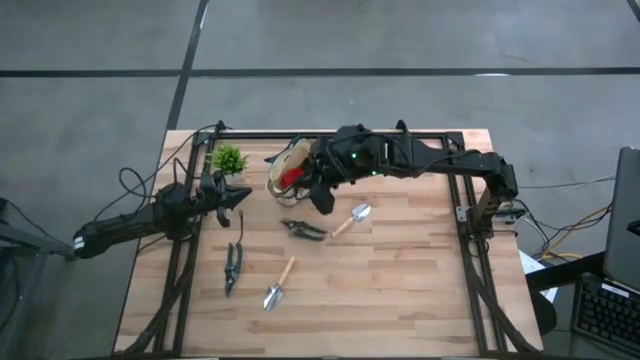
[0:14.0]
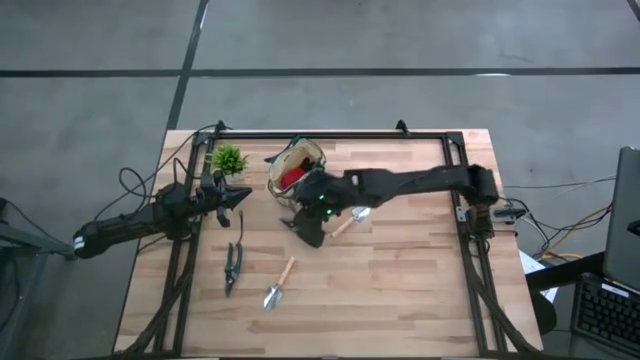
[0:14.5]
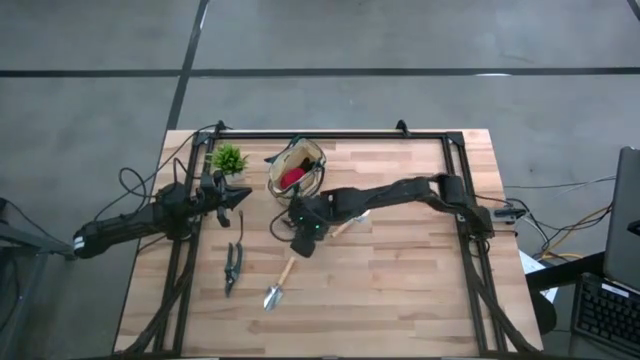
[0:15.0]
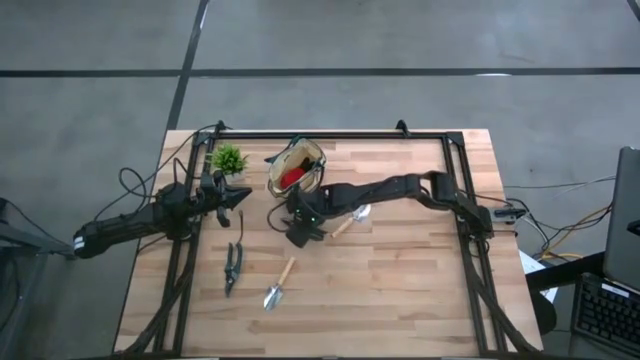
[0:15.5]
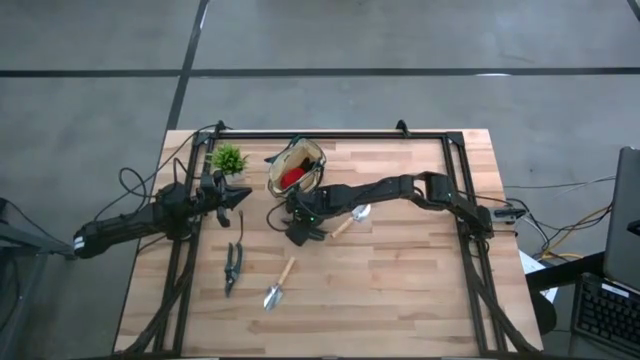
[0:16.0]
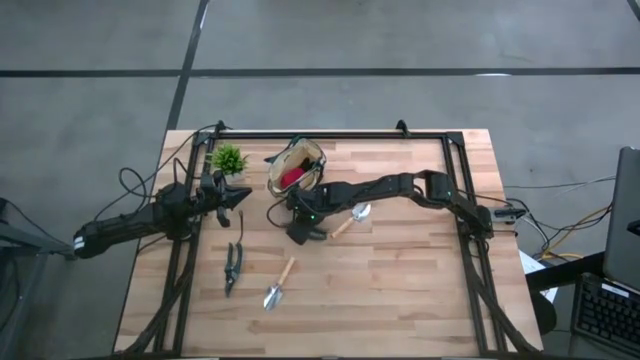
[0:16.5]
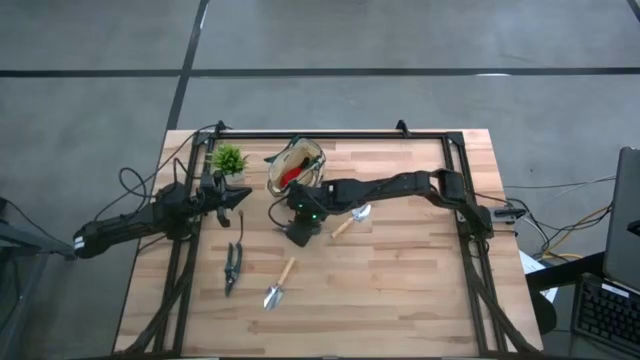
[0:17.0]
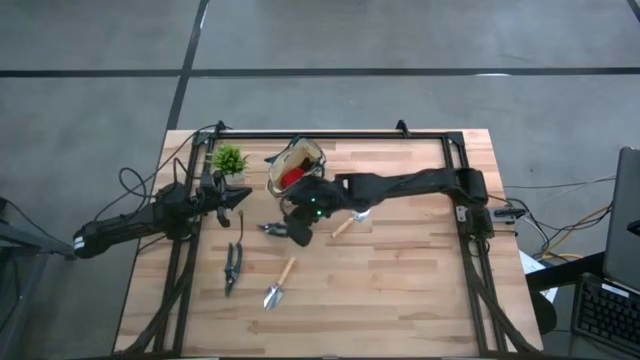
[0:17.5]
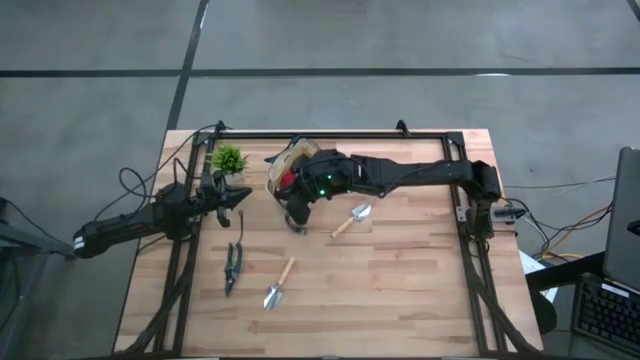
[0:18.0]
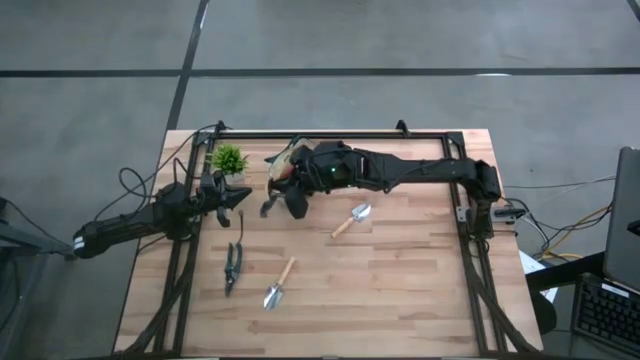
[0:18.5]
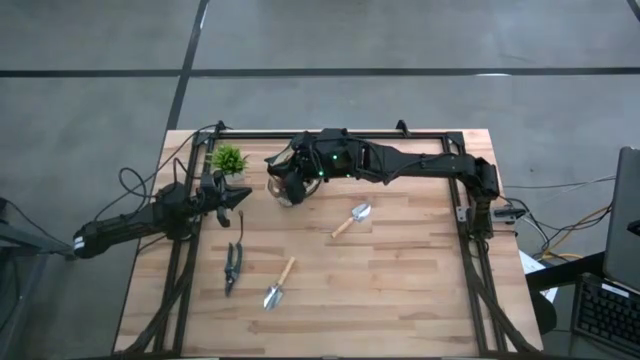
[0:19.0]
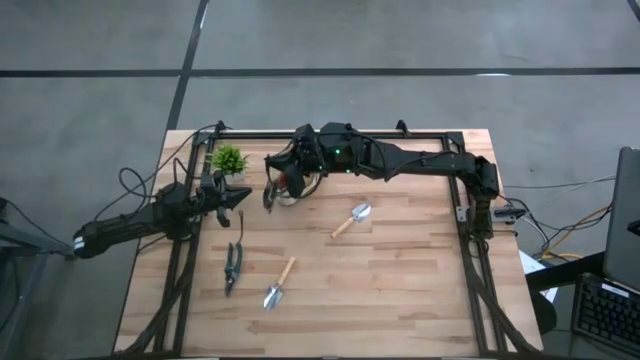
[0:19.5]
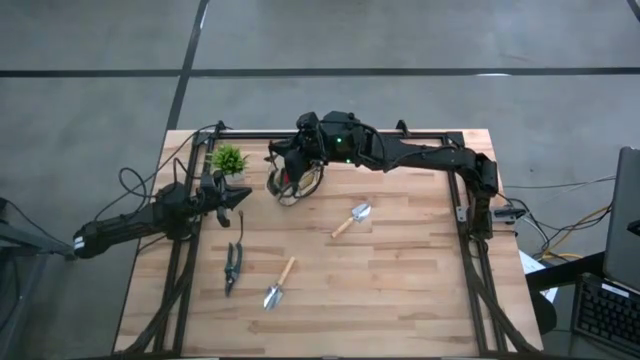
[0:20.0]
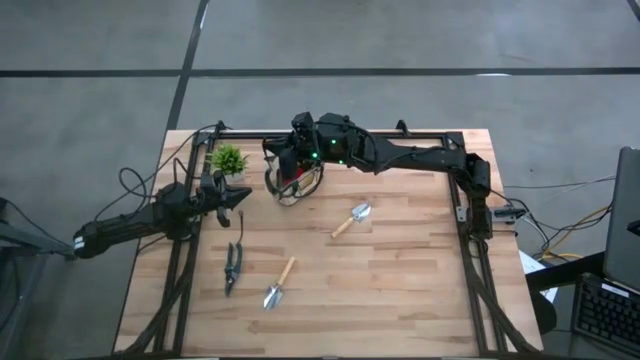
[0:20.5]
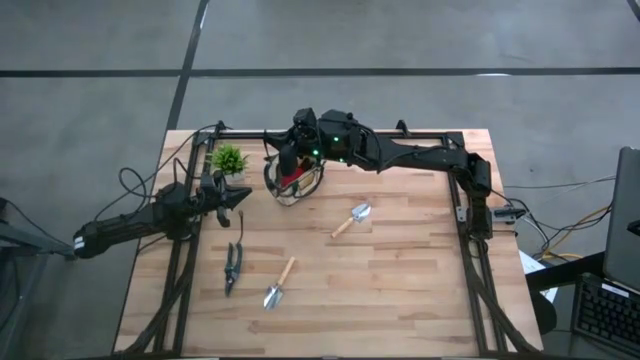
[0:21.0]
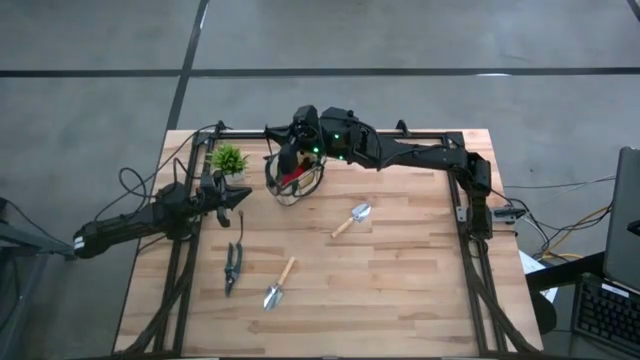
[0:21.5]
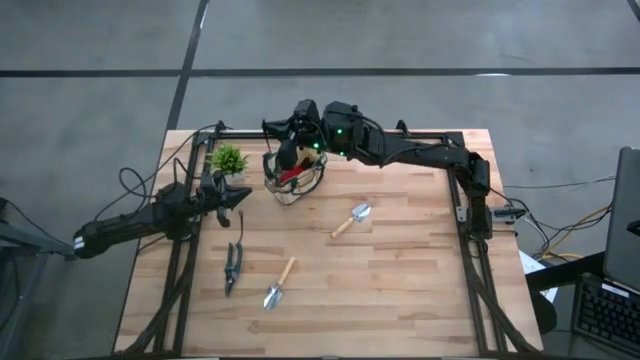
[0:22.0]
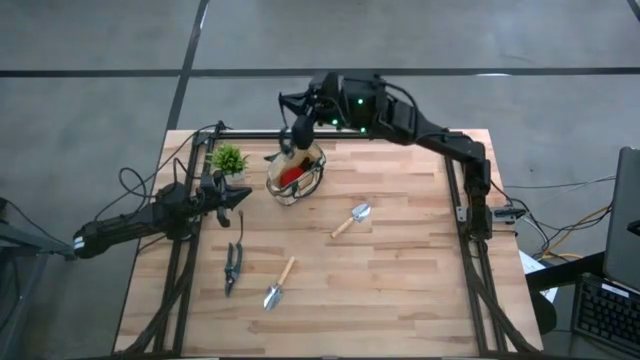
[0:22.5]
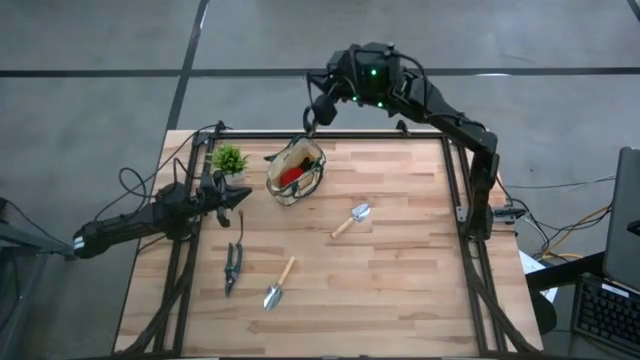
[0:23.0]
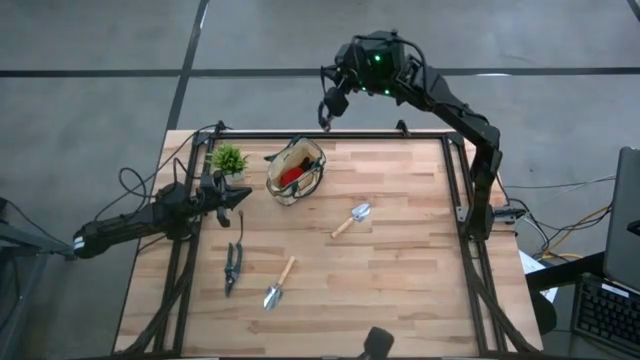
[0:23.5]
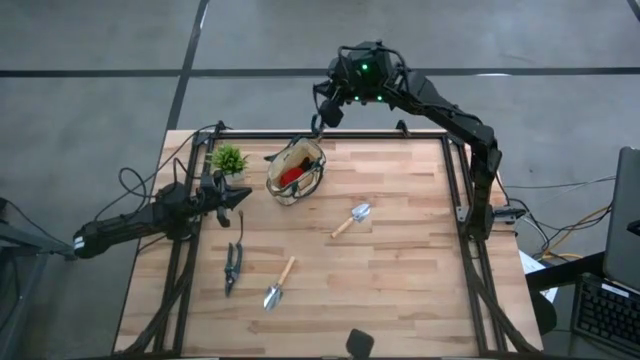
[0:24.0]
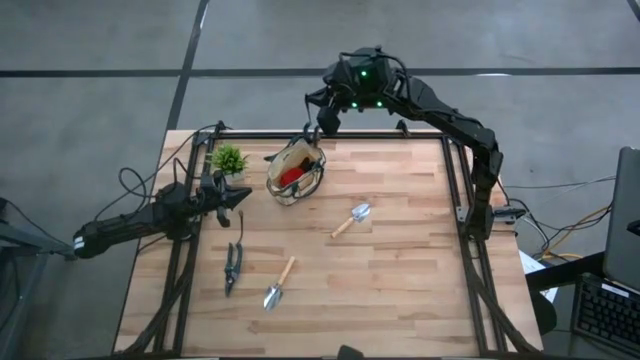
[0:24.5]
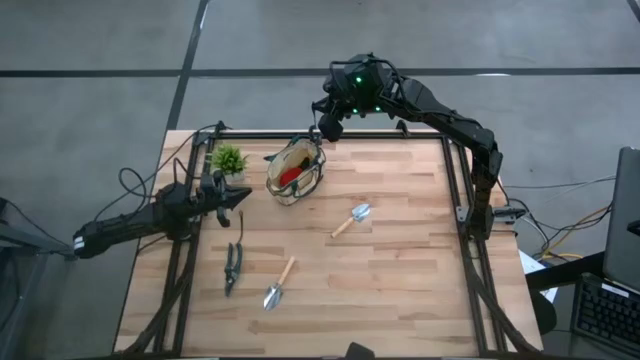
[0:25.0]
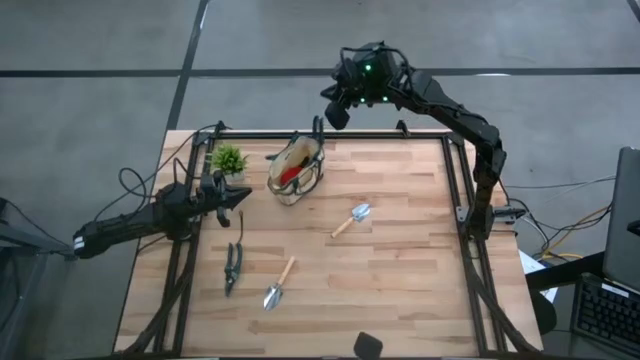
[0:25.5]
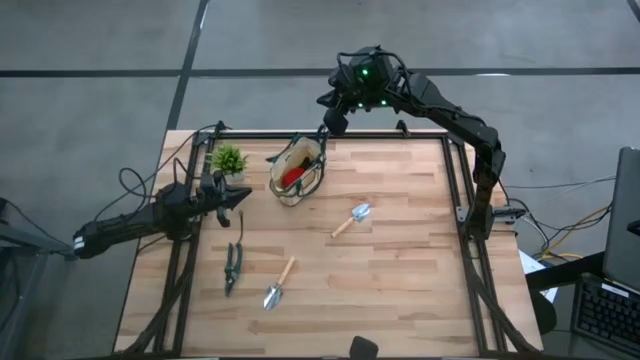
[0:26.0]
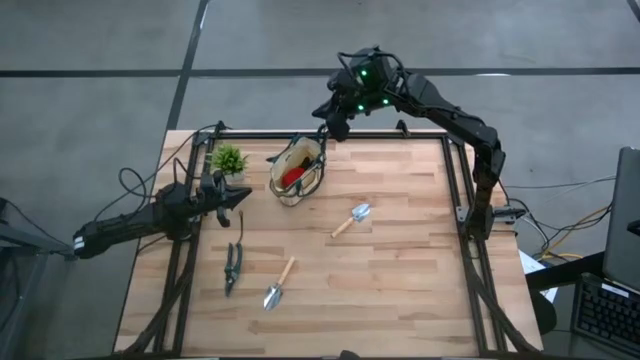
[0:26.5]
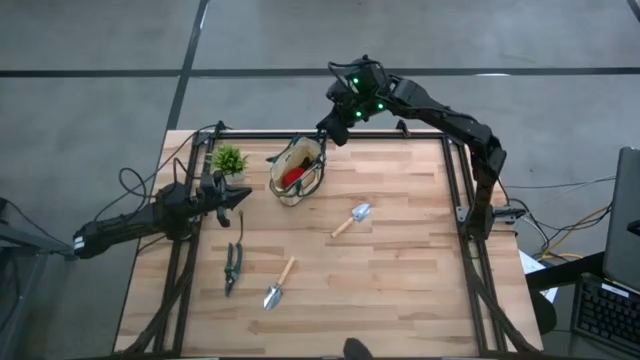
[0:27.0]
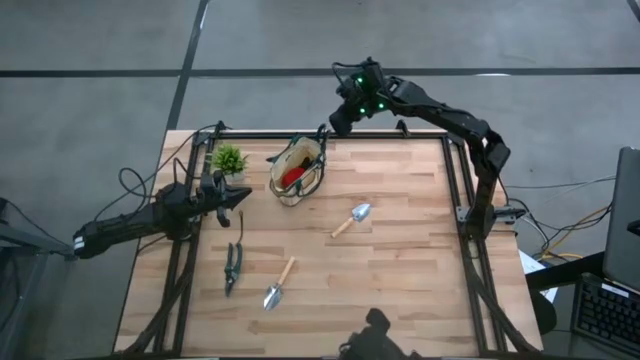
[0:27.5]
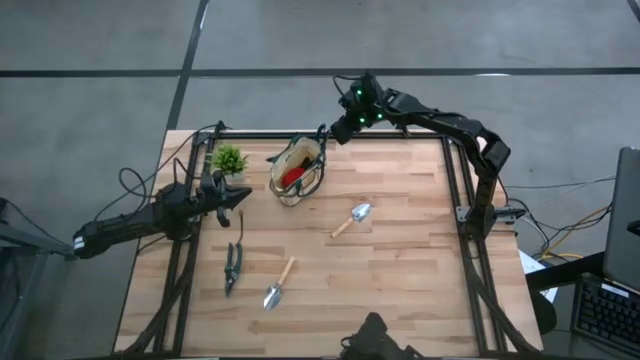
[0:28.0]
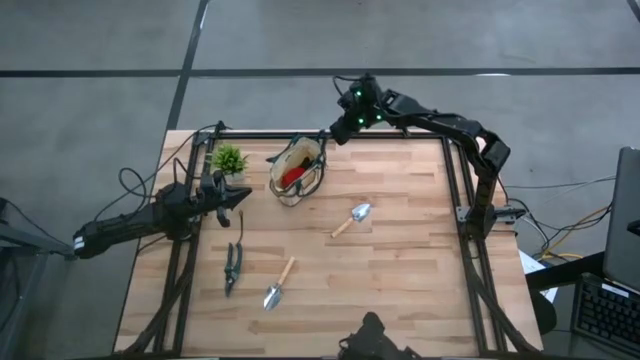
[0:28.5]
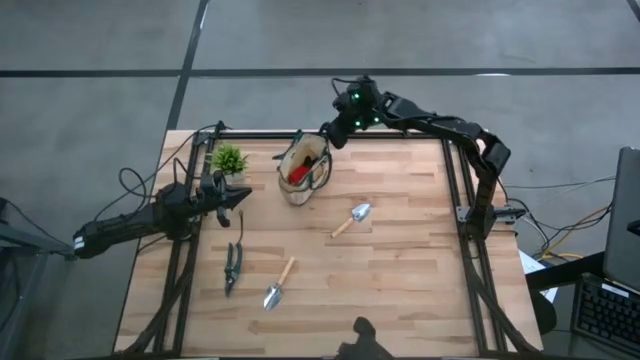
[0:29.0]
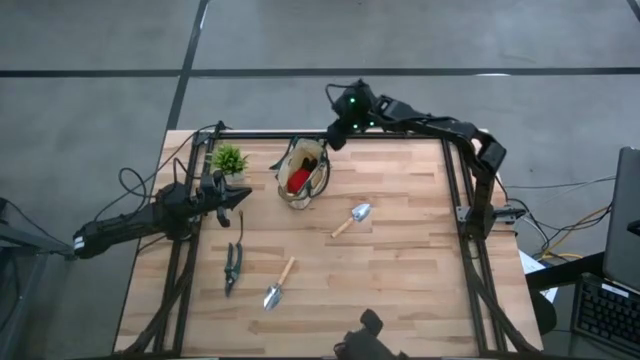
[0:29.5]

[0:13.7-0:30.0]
Task: Pick & Place Garden tools in Gardening bag
Put the right green shear scissor into the green gardening bag

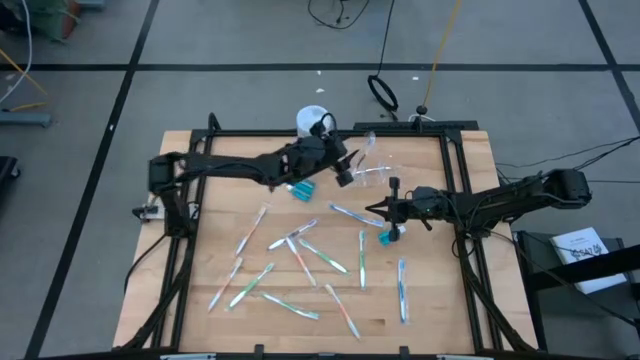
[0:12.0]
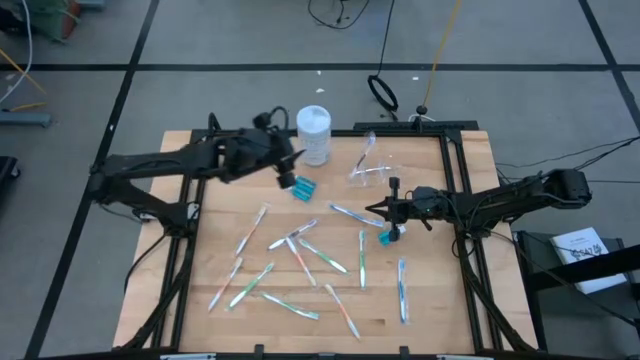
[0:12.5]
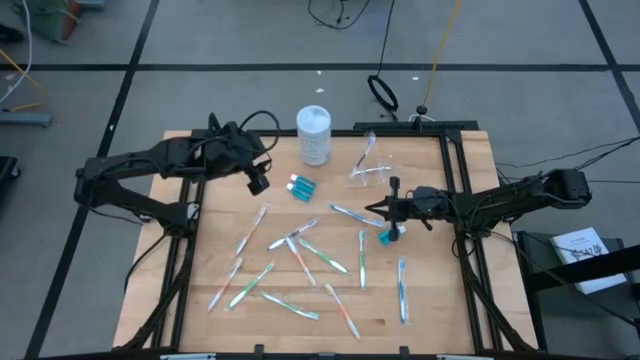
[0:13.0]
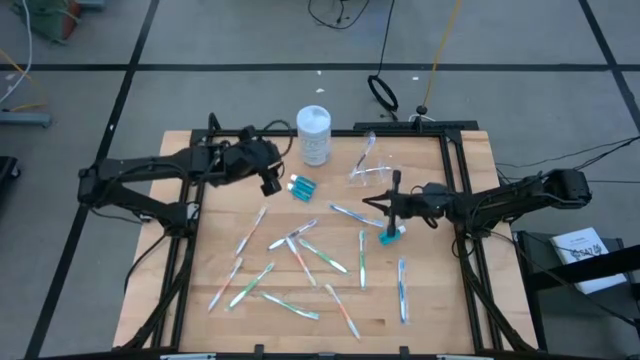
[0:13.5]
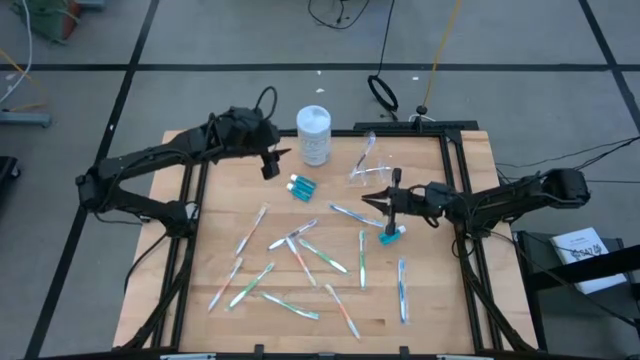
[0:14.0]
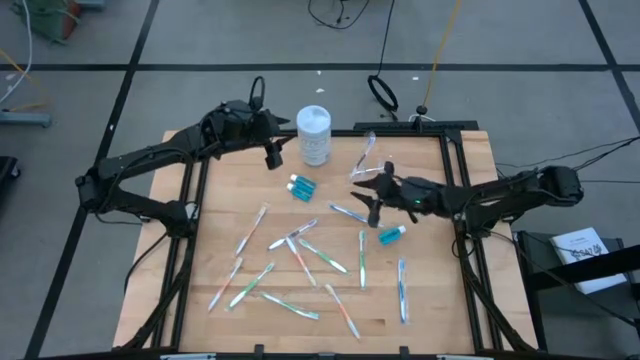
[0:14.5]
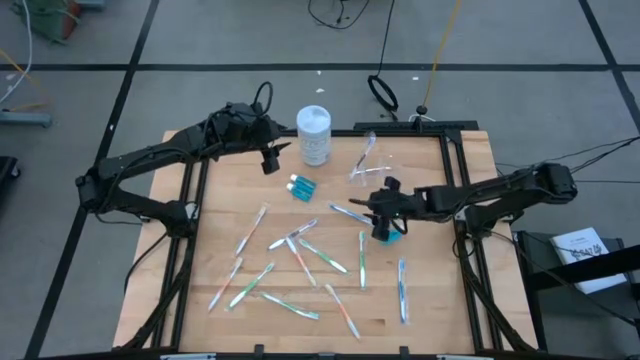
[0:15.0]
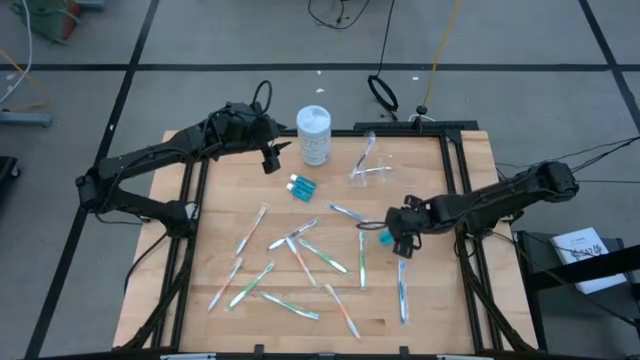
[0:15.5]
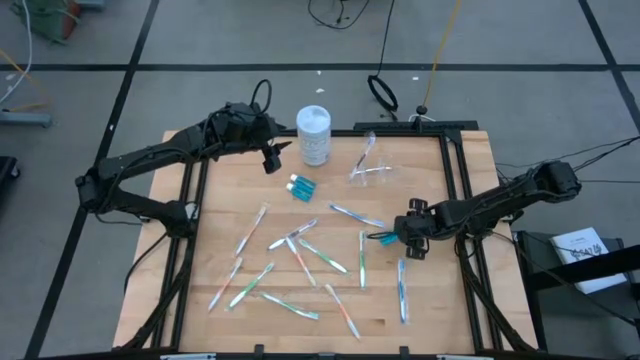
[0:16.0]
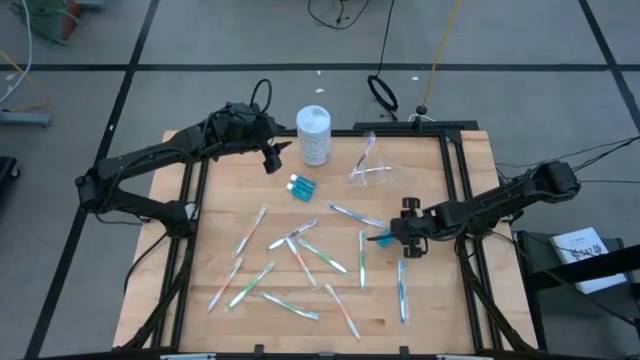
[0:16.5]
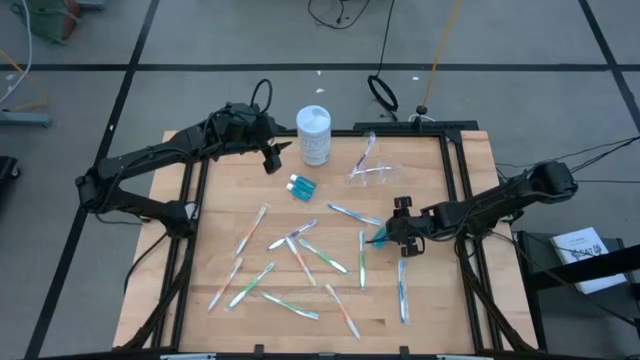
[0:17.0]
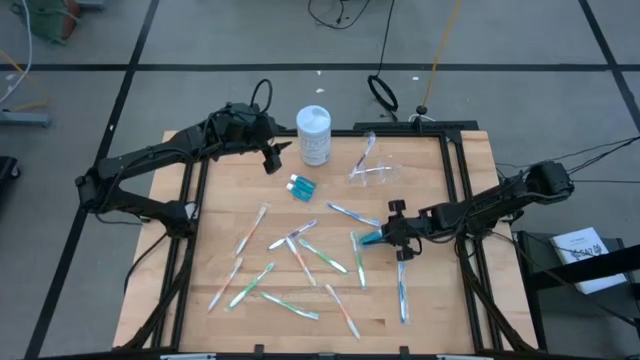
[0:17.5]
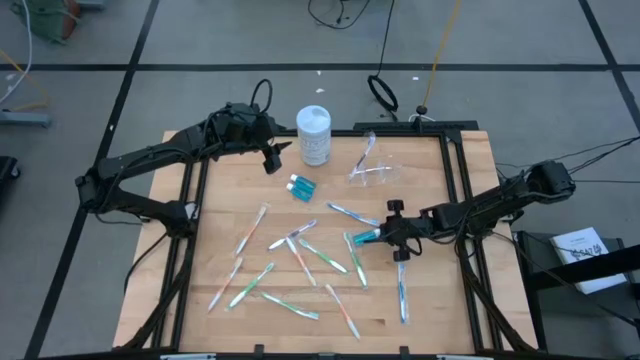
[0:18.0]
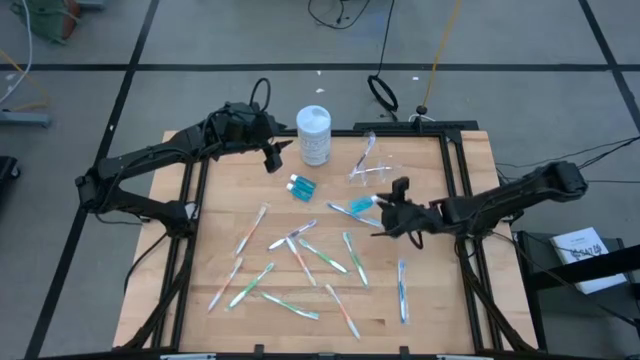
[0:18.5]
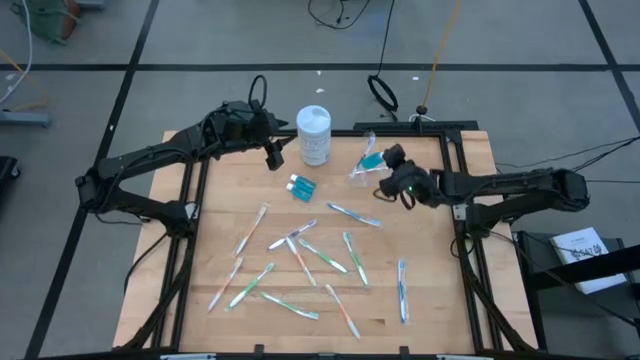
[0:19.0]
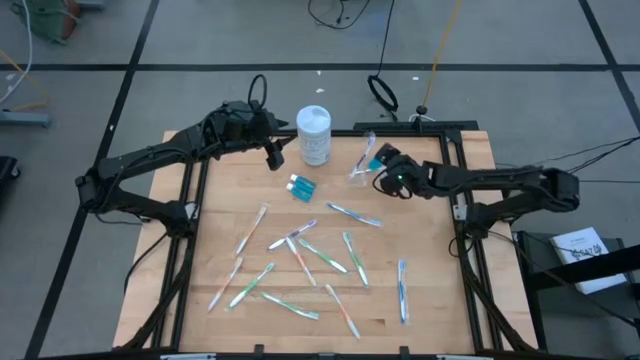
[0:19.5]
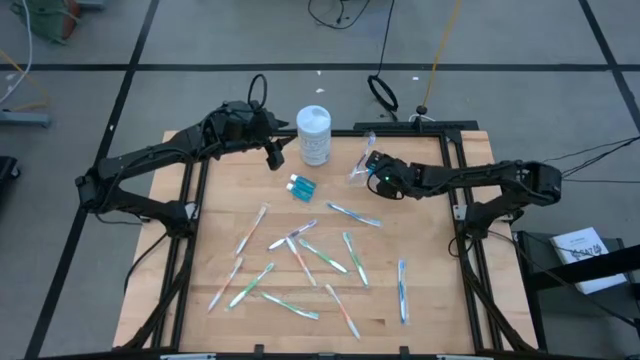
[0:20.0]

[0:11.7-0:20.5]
Task: Pick & Place toothbrushing station
Put the blue mouthwash into the transparent organizer
